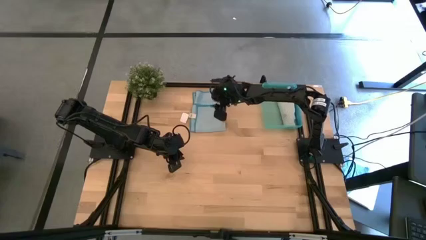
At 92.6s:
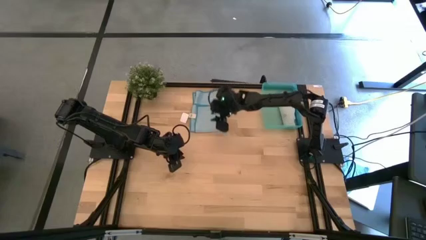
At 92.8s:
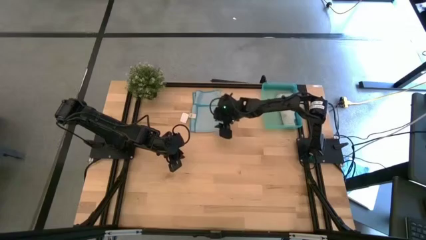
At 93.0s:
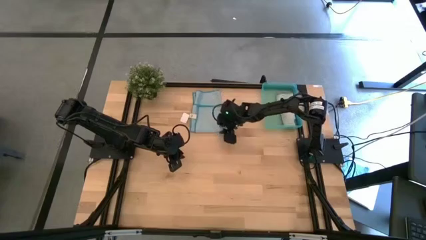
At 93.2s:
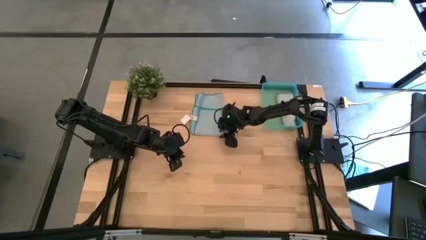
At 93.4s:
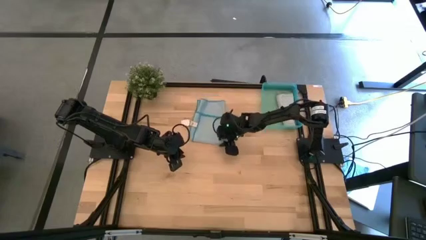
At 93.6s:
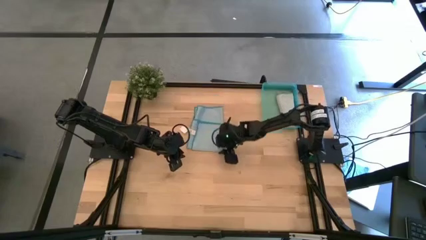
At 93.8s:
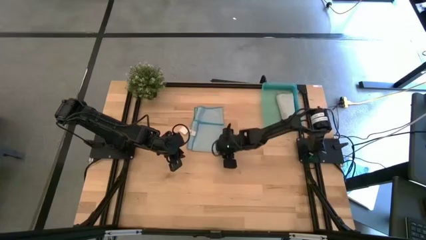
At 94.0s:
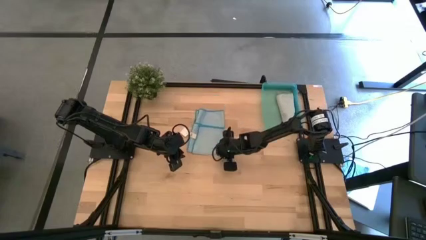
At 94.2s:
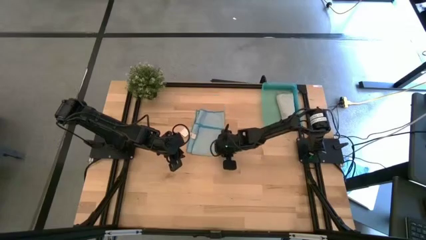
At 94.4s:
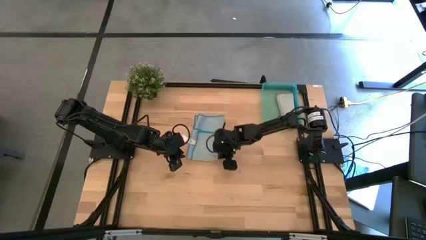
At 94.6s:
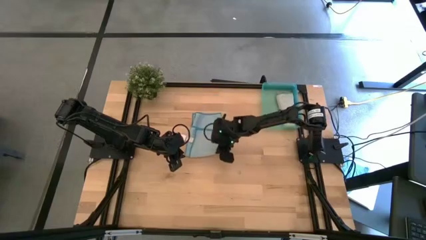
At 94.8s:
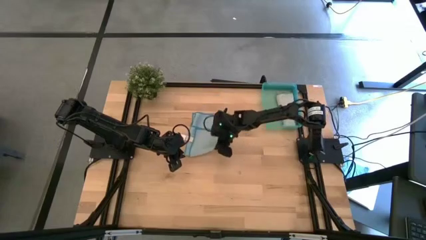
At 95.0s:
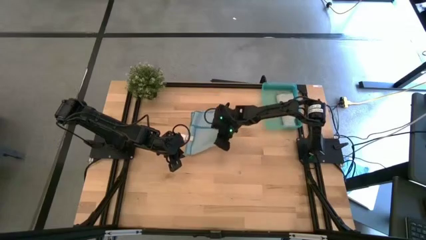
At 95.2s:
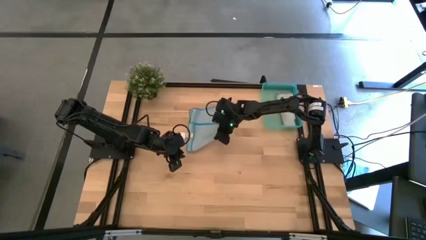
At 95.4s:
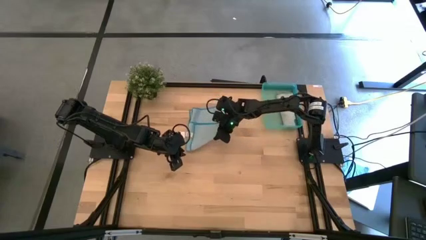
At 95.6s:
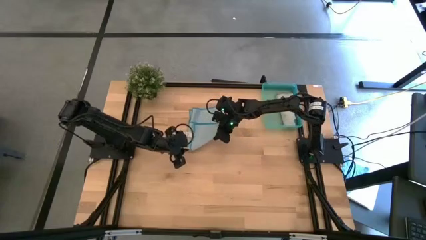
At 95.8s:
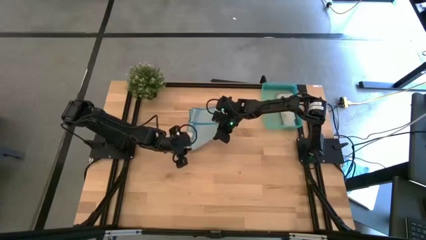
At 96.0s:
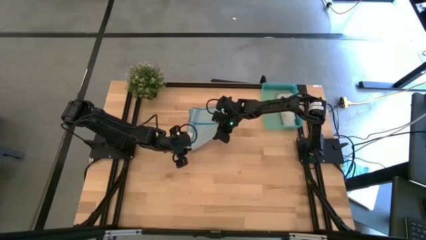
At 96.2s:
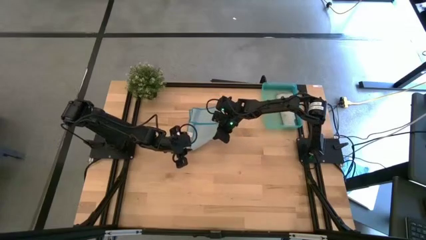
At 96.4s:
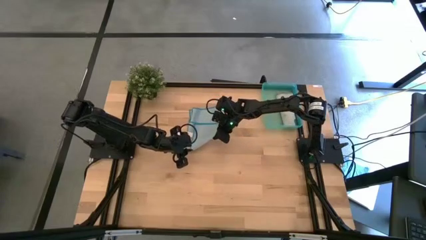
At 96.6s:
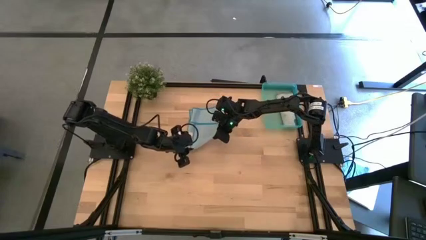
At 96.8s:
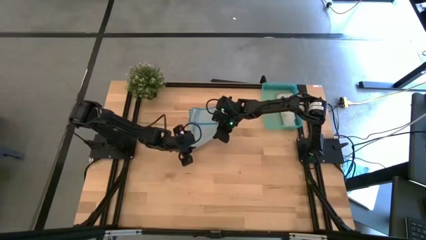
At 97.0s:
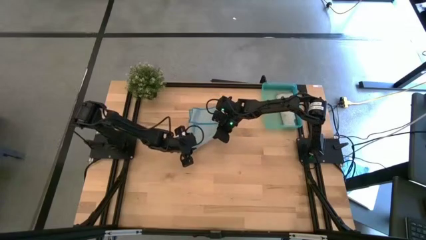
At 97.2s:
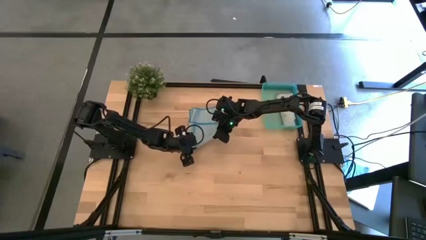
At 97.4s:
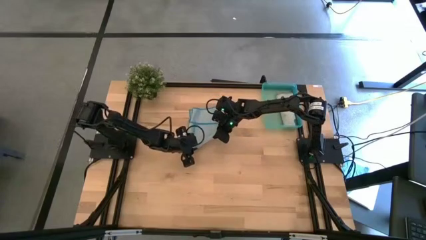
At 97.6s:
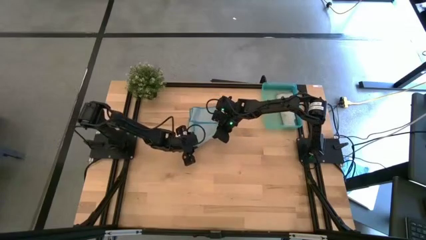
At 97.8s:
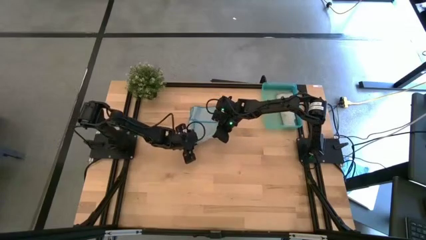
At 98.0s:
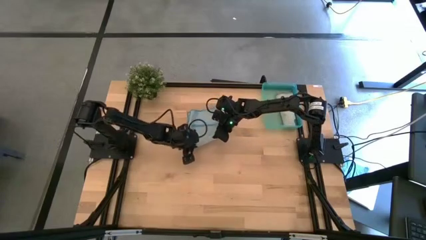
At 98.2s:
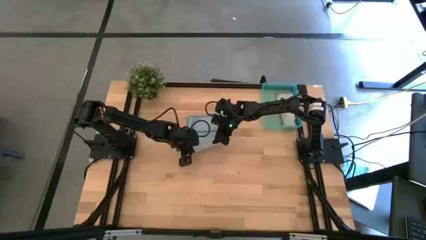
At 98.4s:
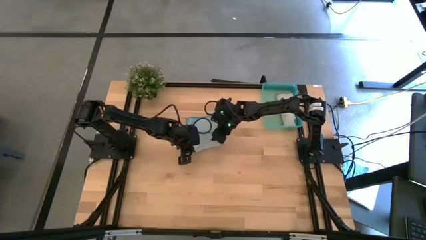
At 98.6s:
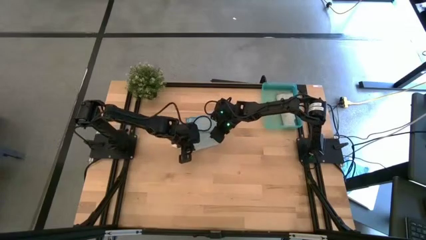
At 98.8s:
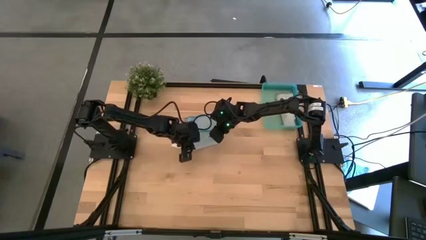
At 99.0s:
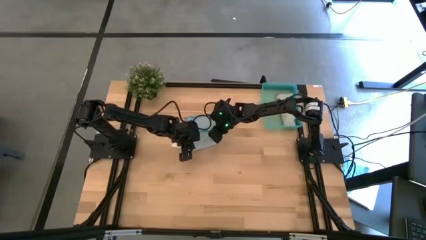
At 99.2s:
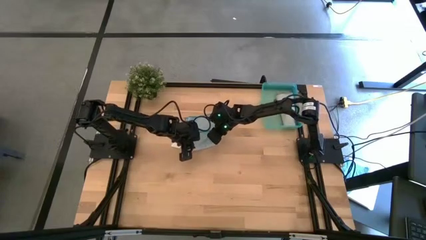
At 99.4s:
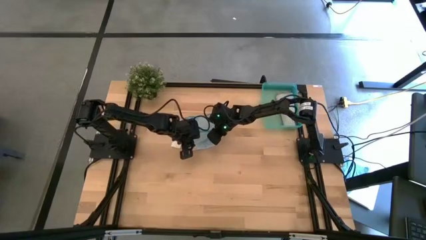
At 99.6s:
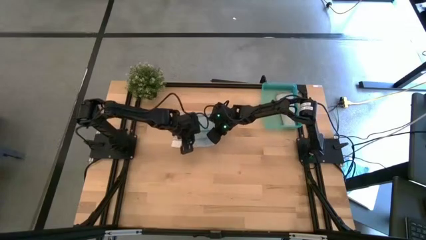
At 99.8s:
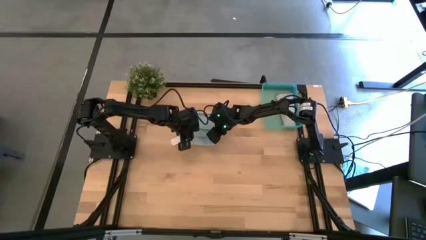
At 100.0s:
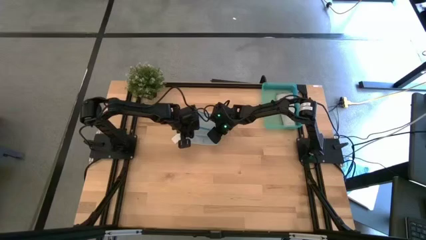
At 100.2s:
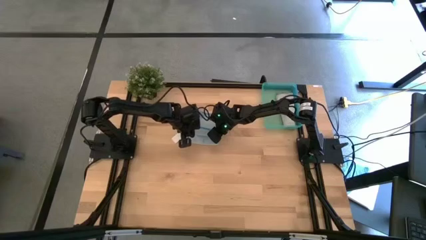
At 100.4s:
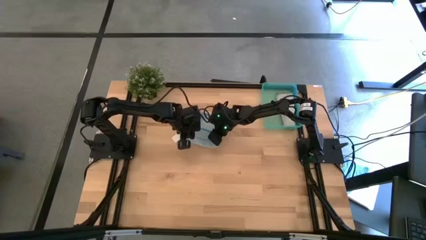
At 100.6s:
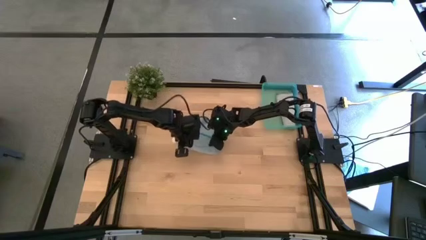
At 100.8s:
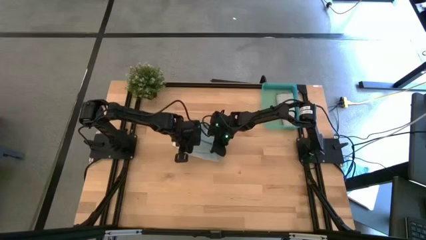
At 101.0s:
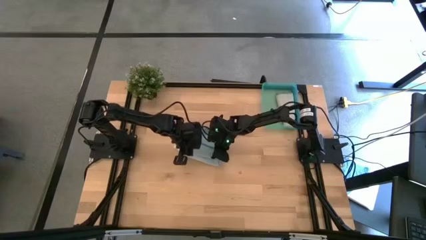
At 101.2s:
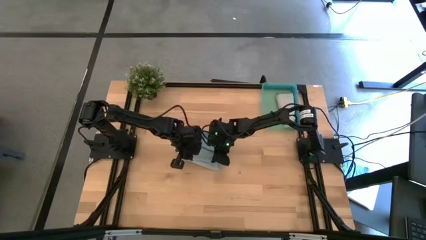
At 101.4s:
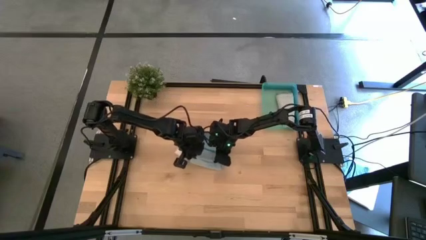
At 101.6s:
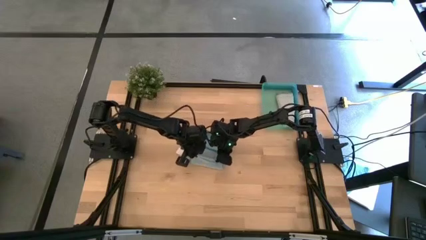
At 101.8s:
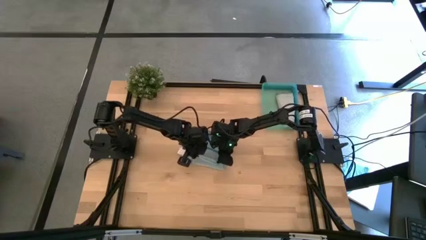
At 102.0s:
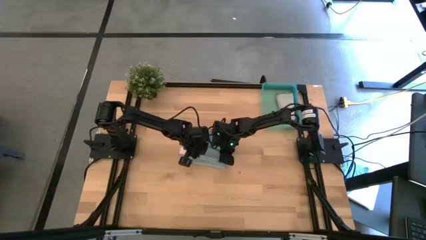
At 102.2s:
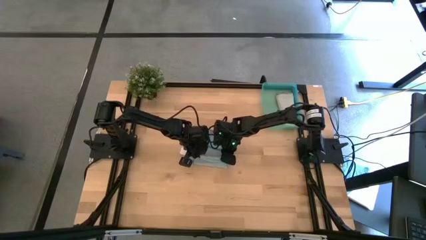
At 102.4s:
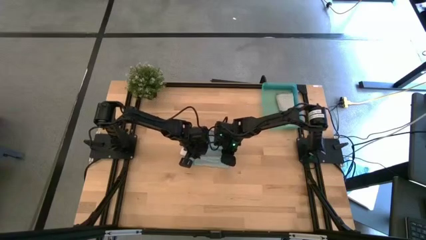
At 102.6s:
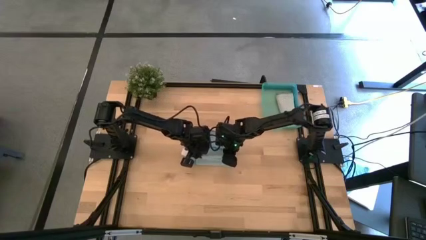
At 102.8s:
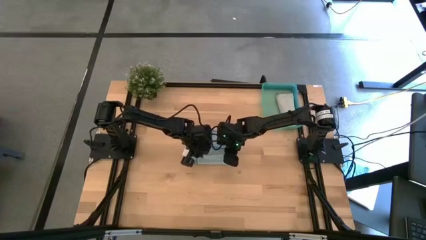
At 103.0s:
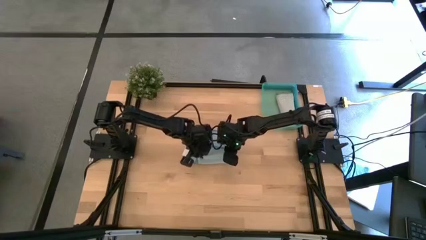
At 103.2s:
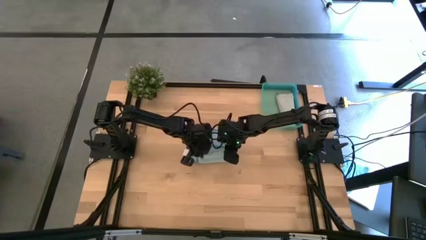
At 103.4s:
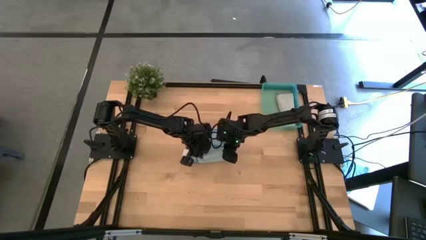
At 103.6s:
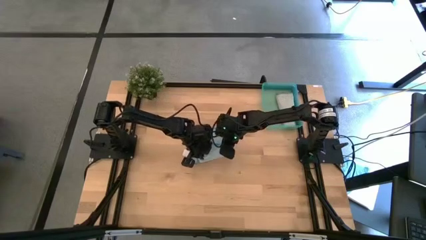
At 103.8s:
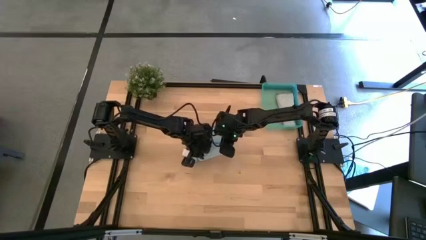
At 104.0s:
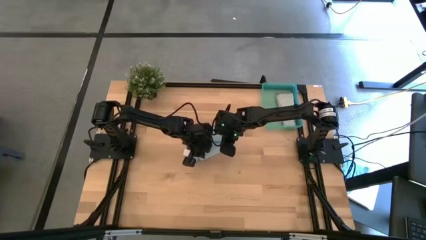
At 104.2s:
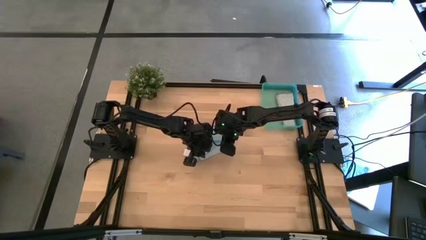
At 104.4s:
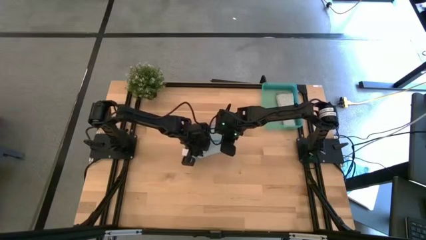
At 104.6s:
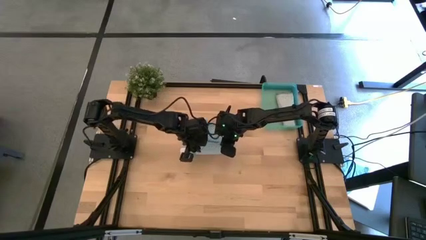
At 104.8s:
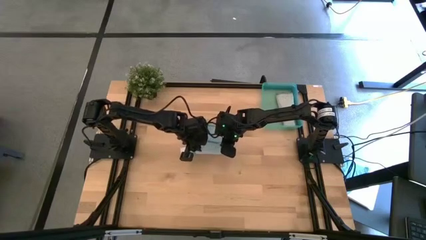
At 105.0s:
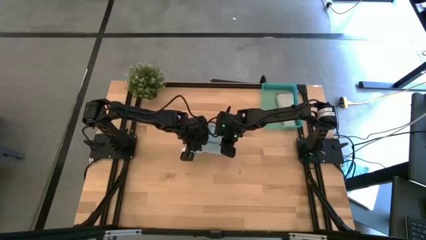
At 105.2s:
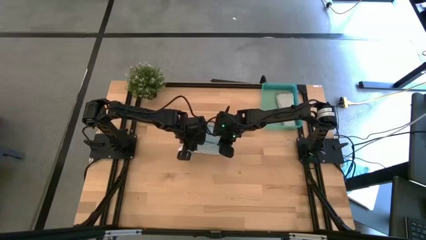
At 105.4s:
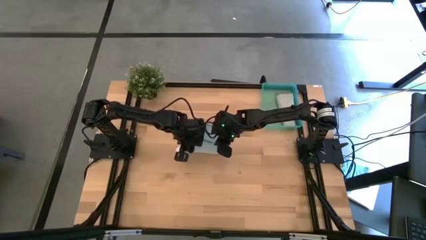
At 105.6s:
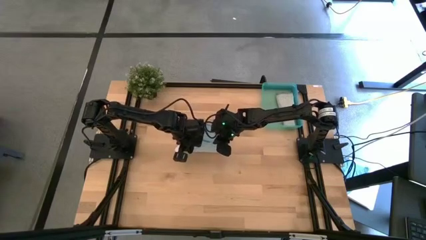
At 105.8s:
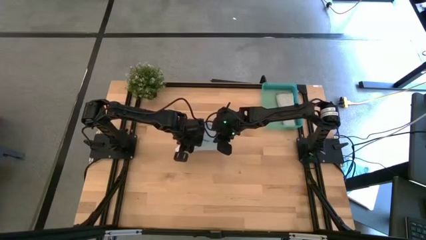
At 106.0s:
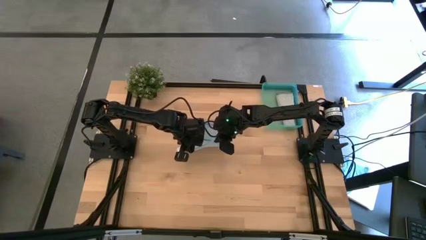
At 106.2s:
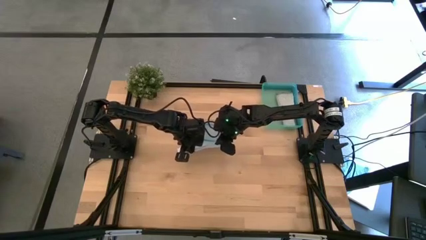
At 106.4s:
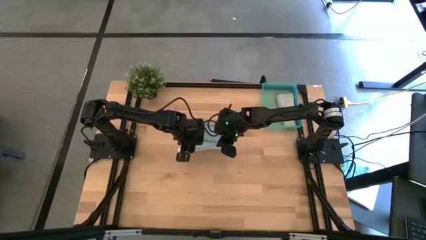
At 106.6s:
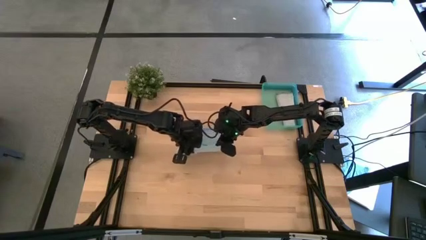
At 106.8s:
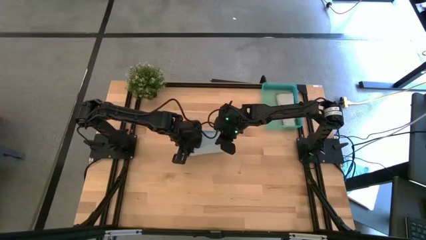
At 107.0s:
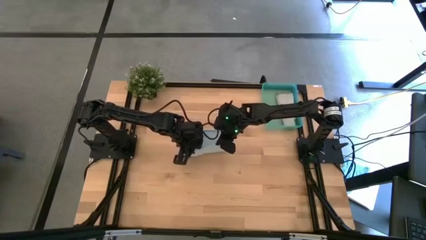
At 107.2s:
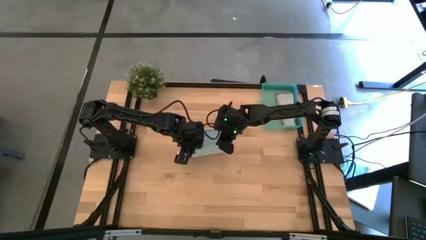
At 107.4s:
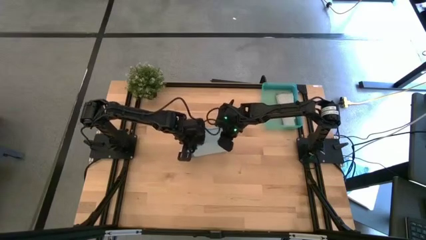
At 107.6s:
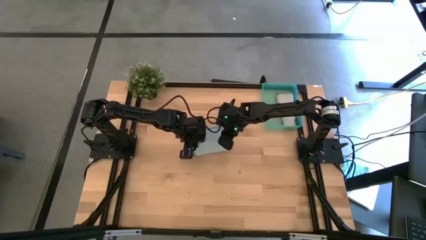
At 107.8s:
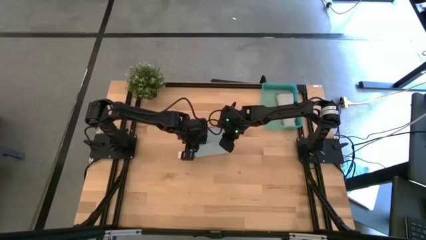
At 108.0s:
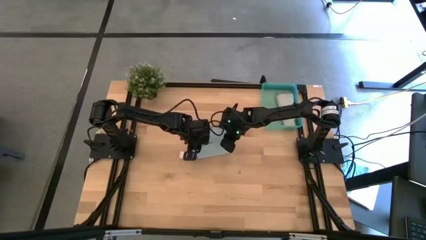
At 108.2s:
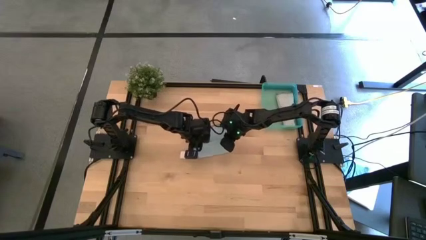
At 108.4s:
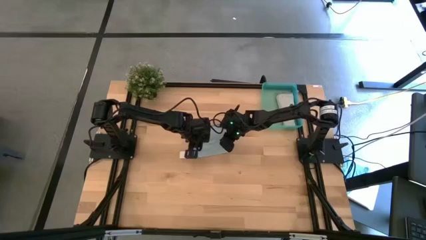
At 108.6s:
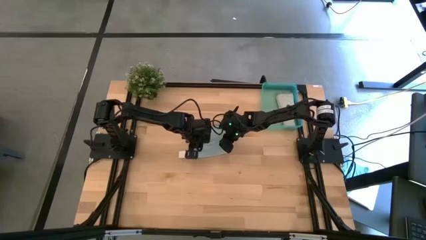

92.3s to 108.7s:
Task: Roll microfiber towels into tight, uniform cylinder then place into a basket
Roll the blue towel
